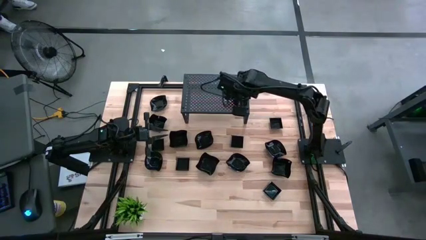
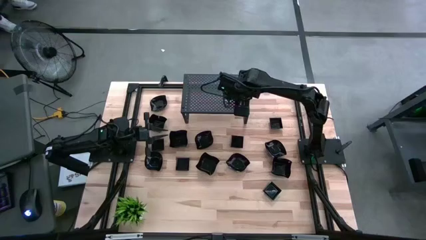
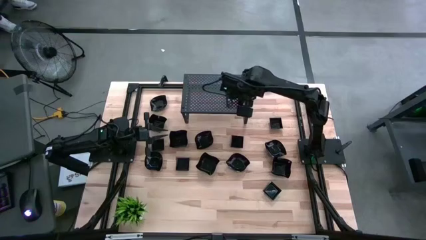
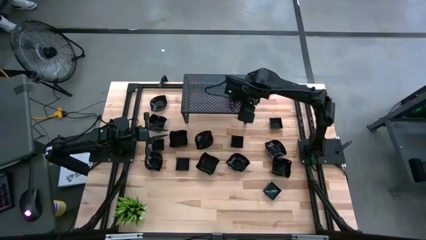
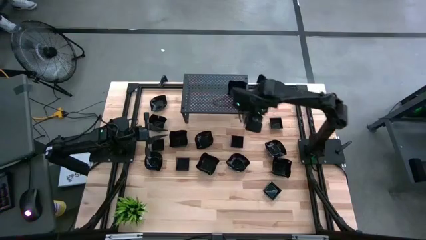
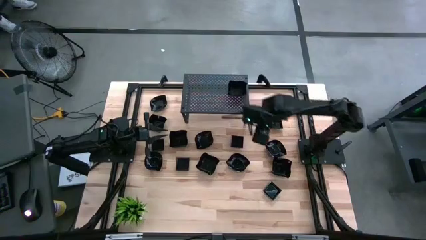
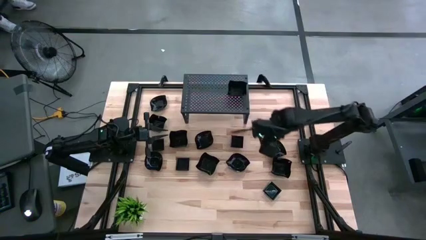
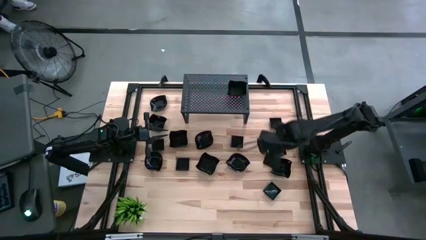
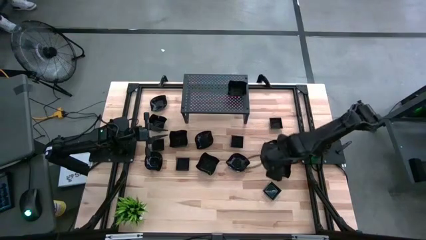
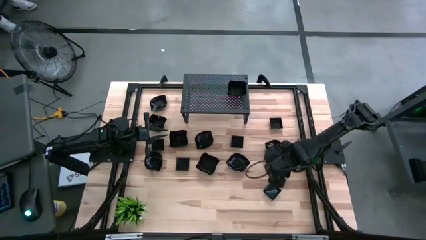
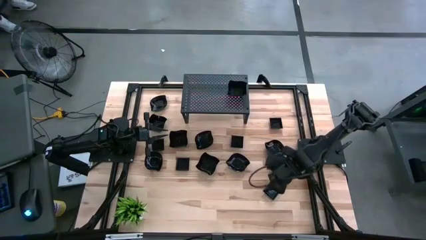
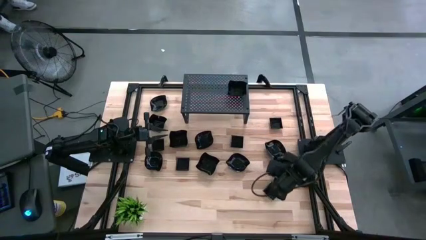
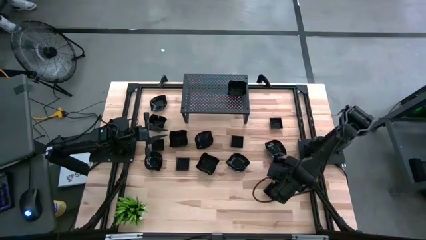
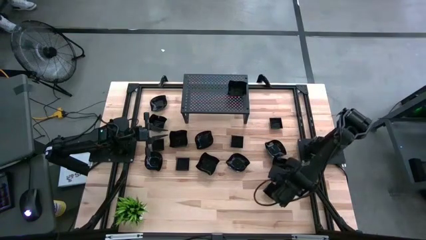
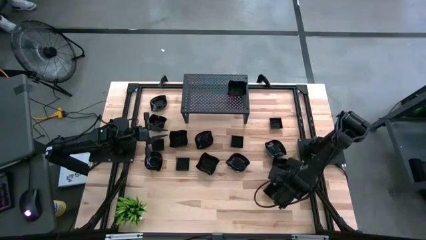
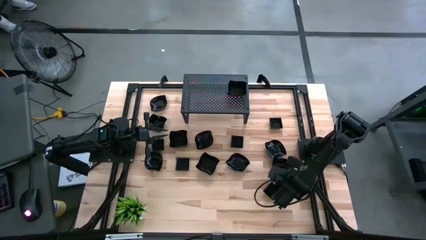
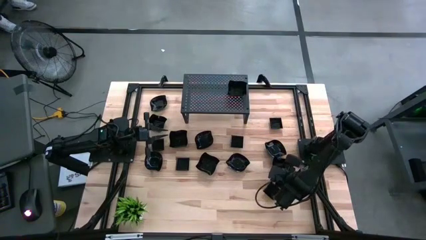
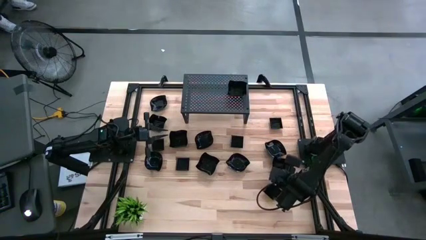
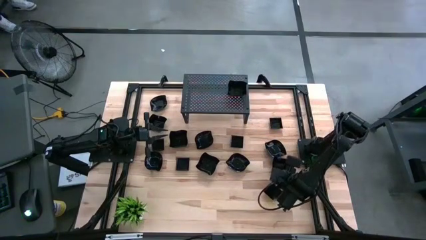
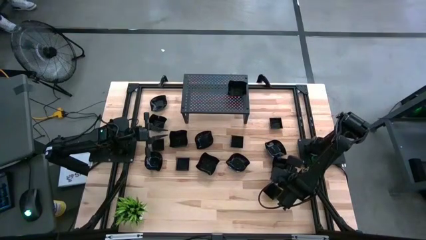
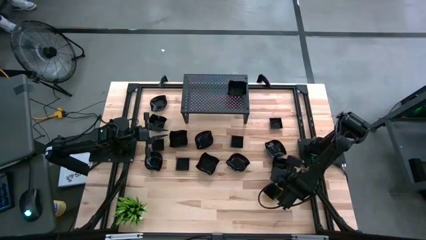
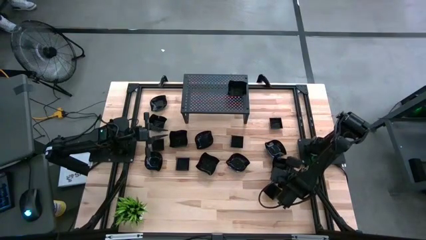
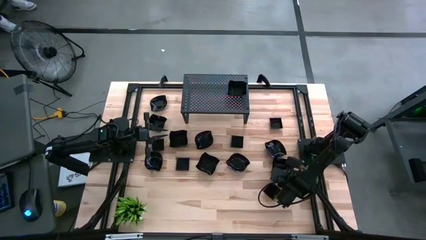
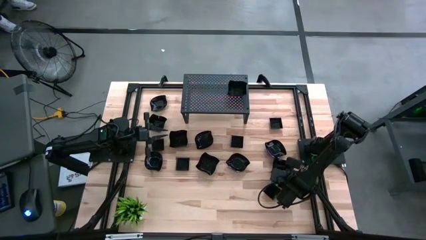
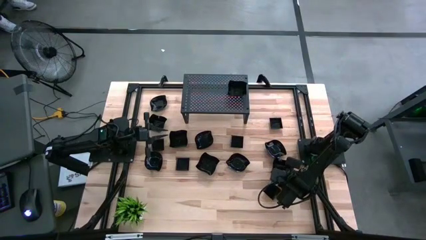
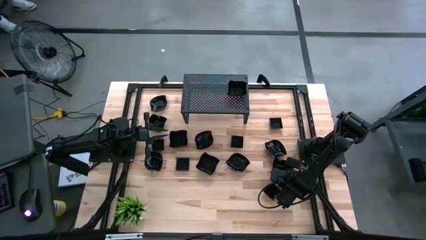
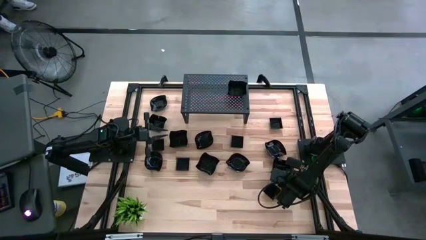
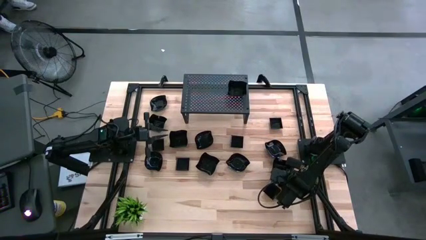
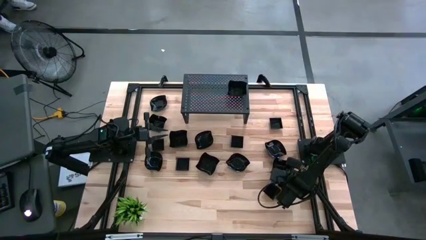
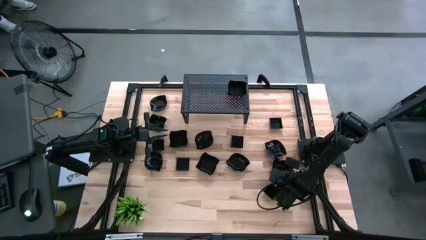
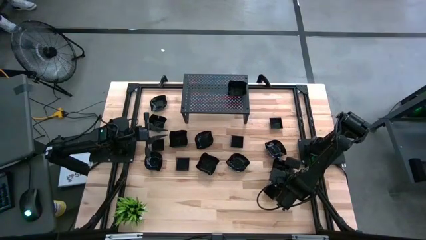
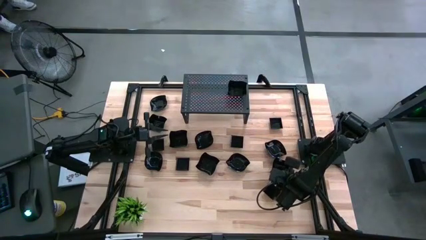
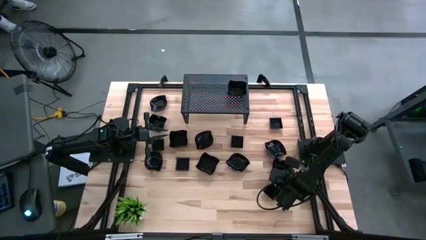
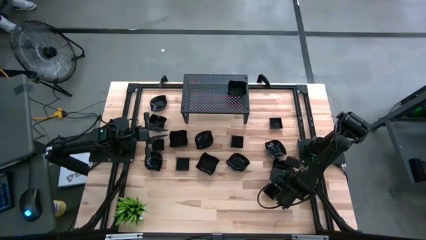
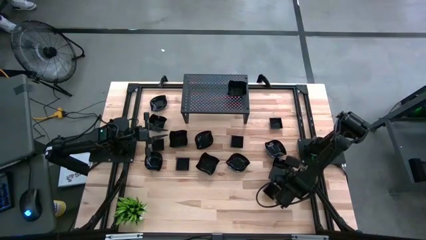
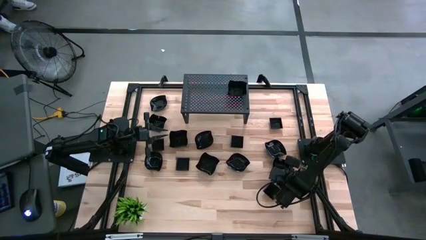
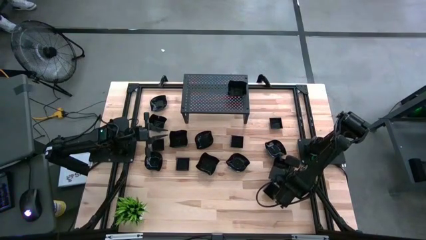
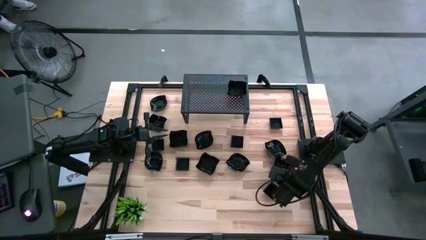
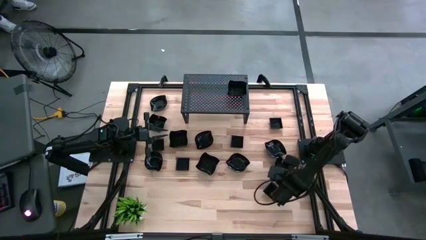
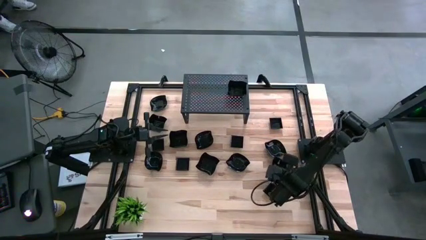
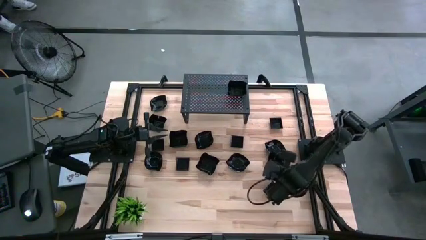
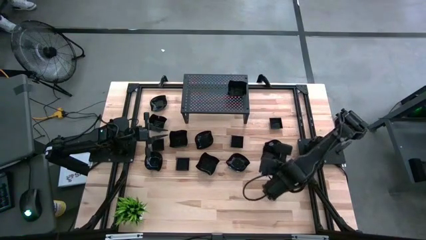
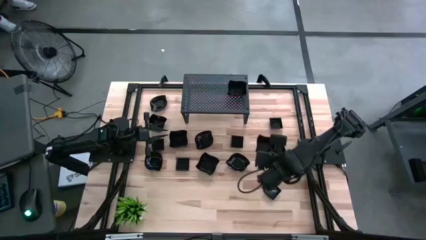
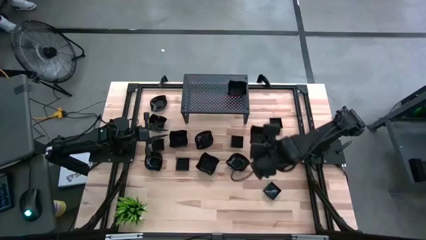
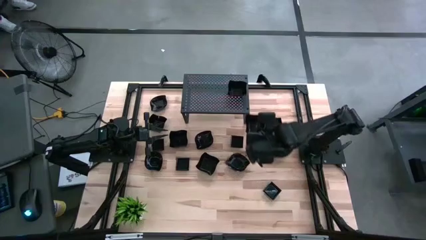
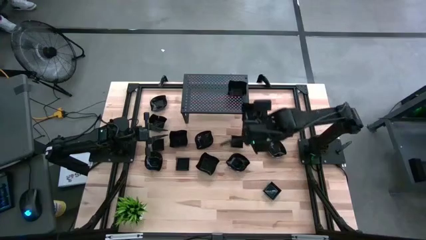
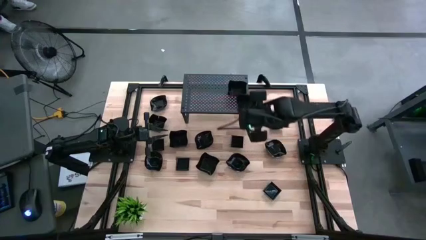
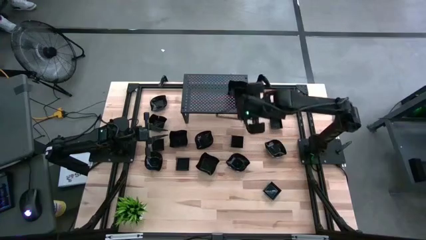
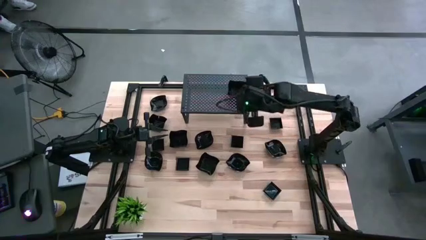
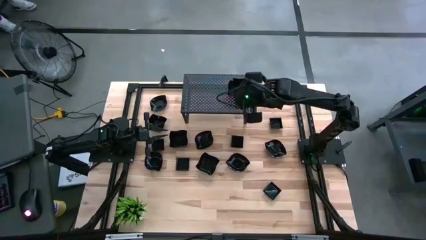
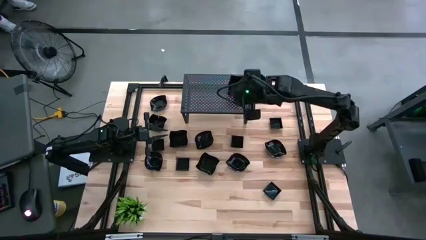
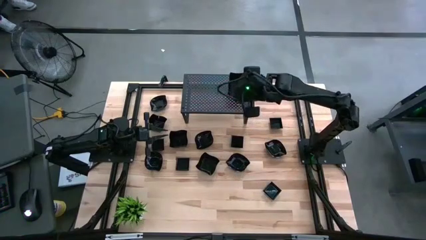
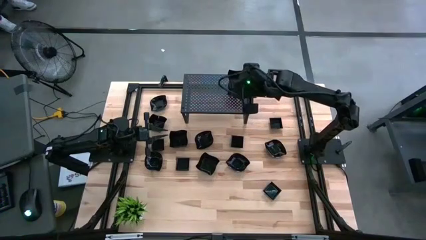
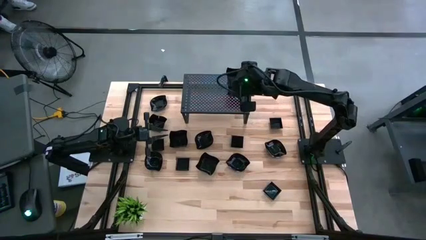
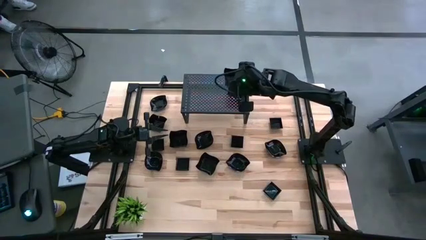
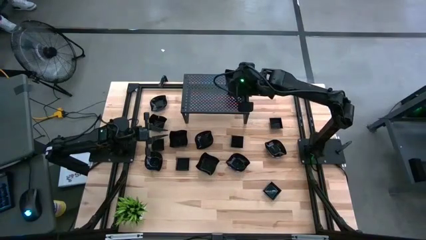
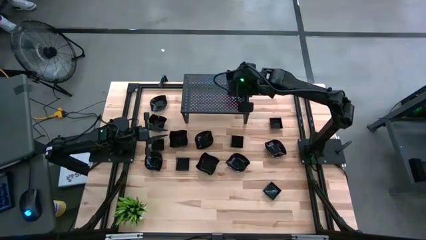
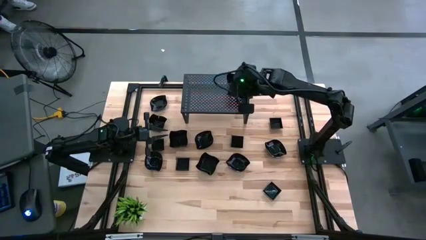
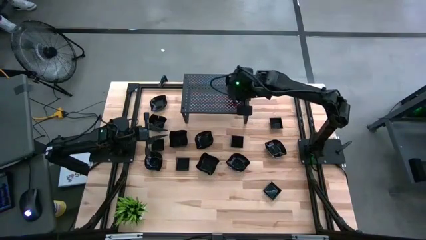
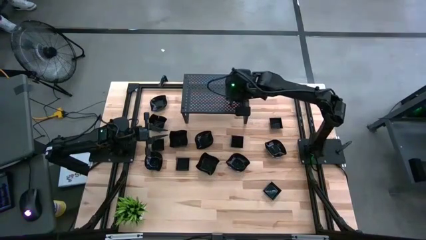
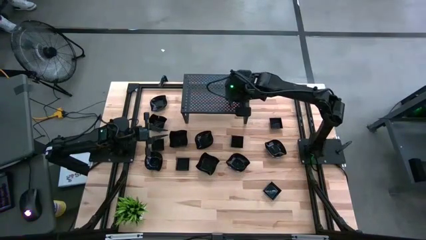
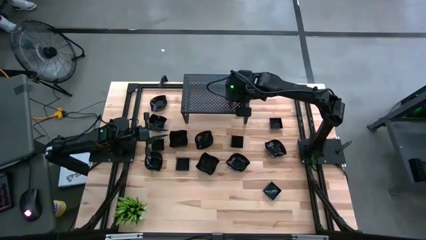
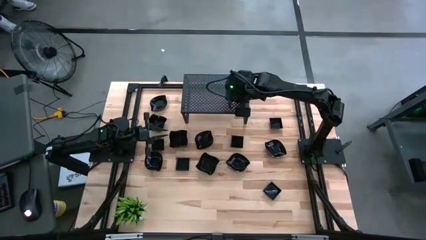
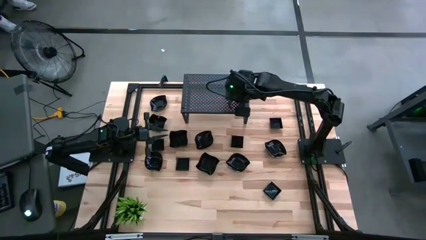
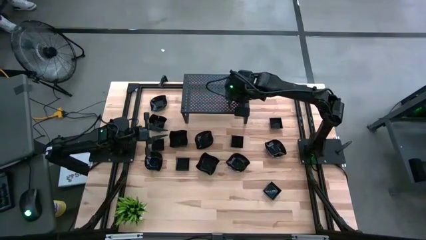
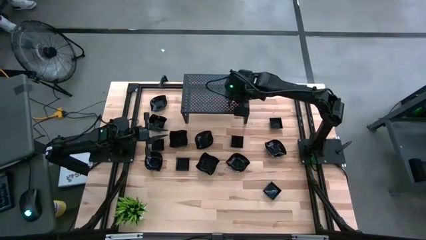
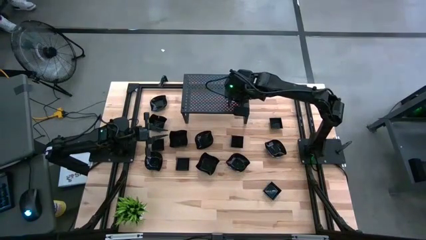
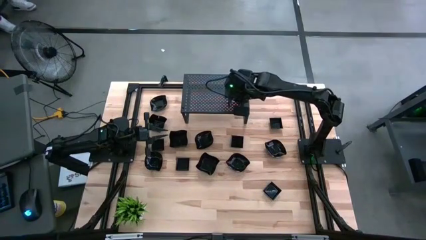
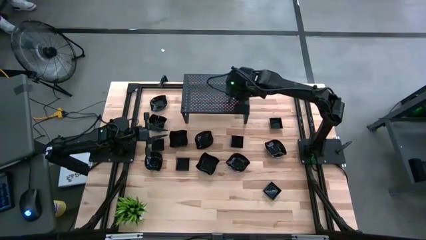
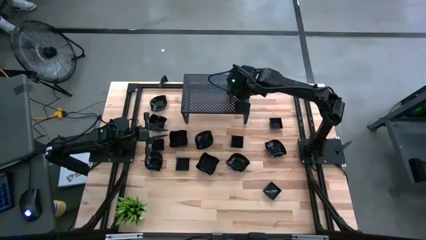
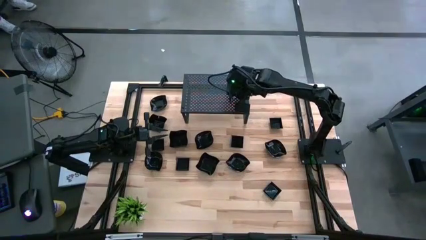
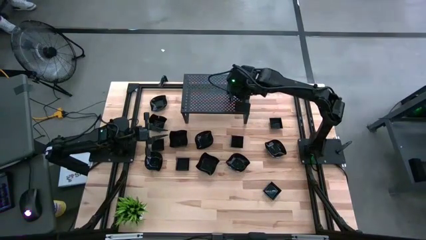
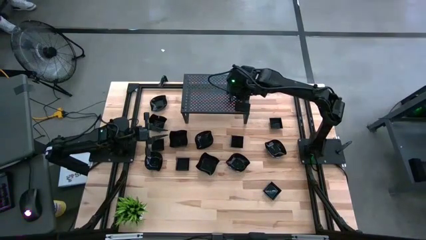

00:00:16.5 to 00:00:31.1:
Task: Pick & Place Mini shaped plates
Stack the black distorted square plate on top of the black distorted square plate on the shelf
